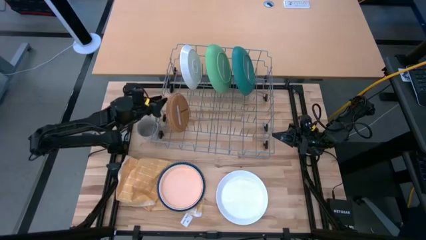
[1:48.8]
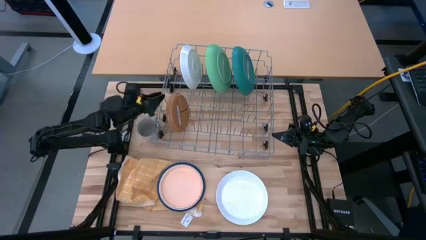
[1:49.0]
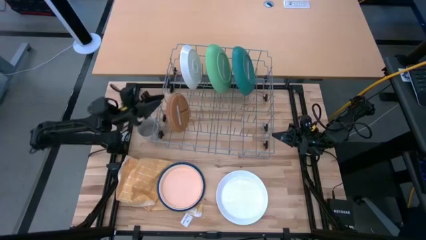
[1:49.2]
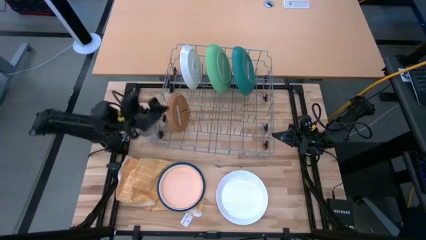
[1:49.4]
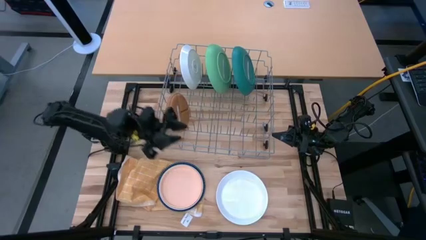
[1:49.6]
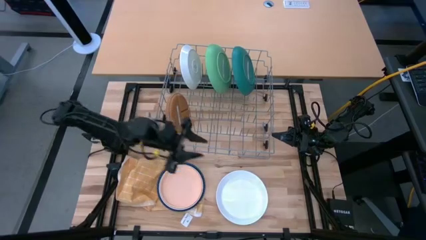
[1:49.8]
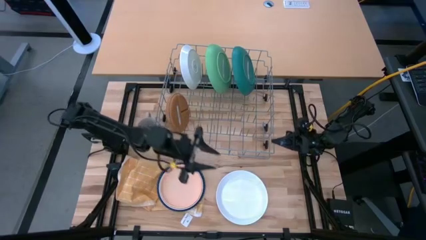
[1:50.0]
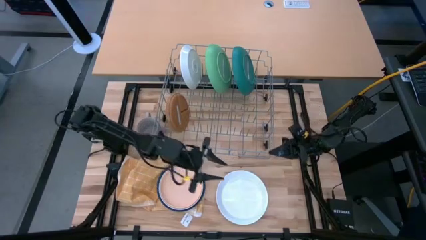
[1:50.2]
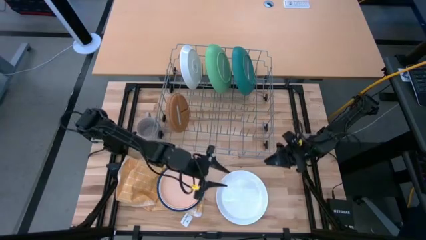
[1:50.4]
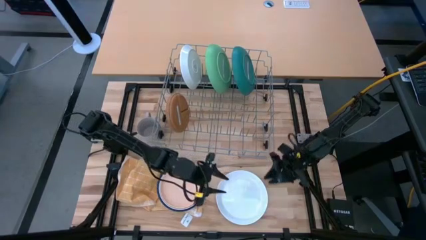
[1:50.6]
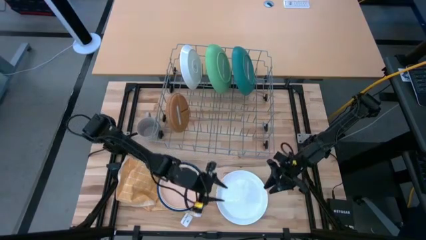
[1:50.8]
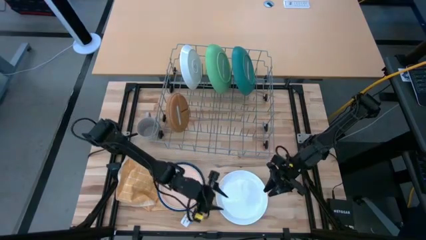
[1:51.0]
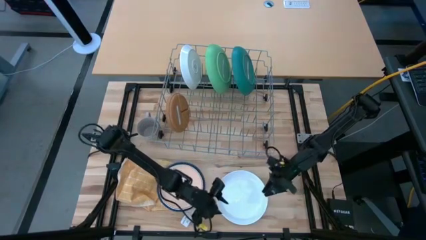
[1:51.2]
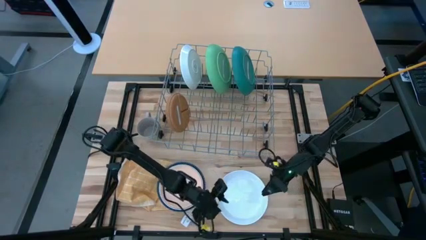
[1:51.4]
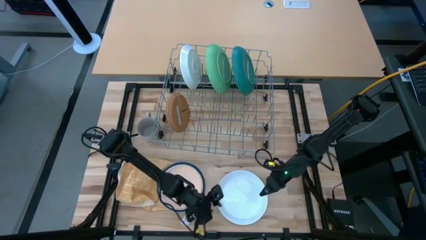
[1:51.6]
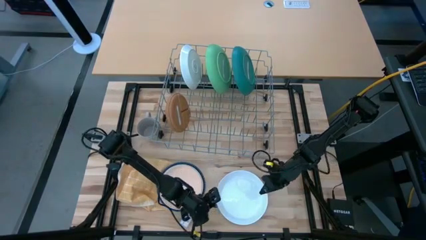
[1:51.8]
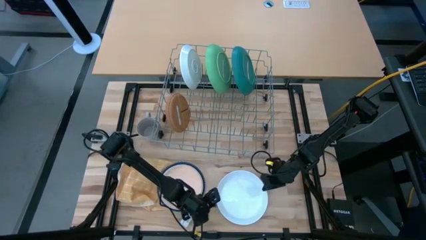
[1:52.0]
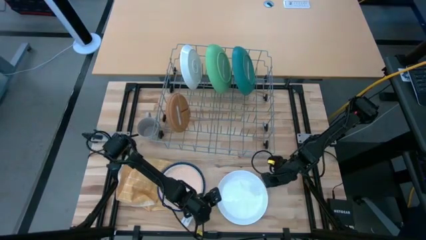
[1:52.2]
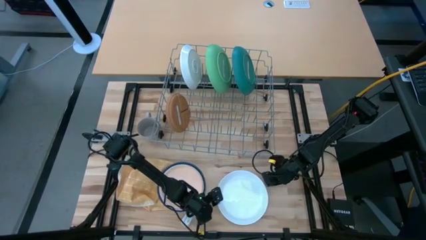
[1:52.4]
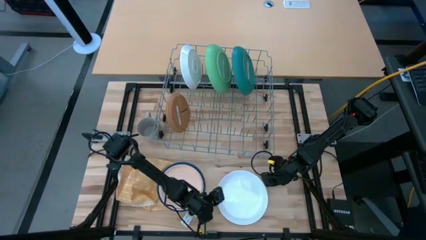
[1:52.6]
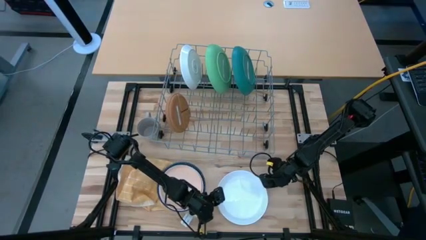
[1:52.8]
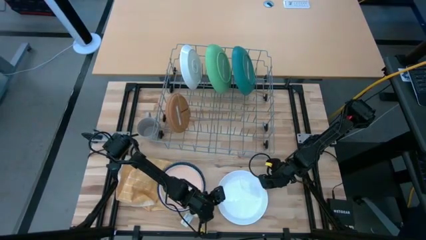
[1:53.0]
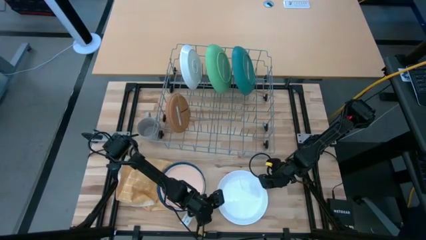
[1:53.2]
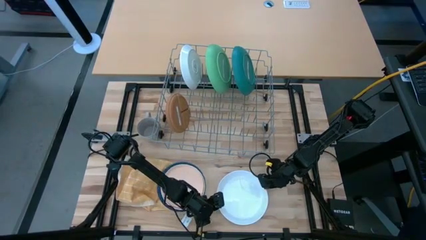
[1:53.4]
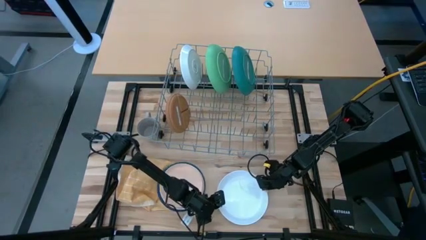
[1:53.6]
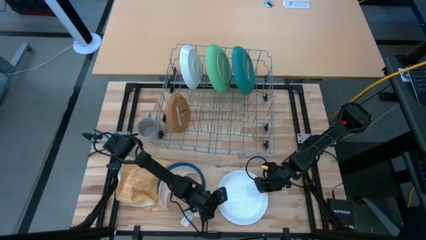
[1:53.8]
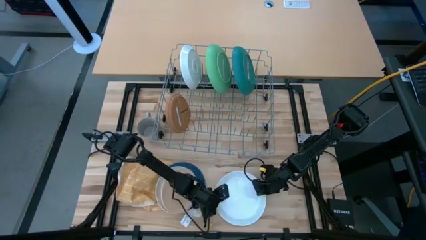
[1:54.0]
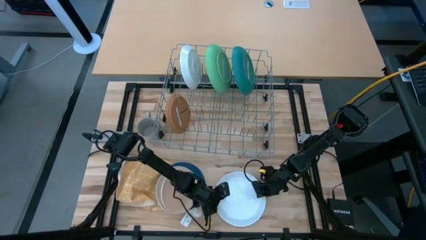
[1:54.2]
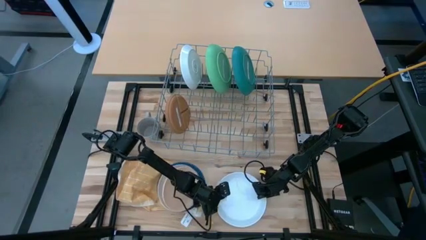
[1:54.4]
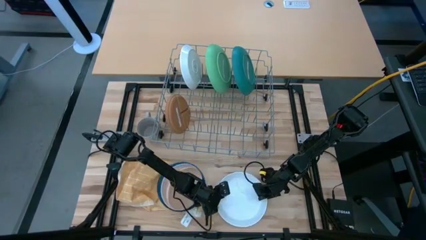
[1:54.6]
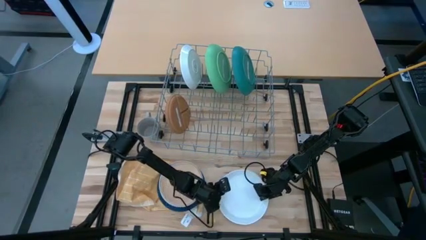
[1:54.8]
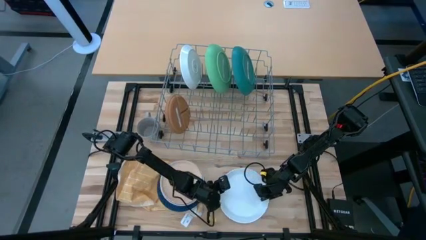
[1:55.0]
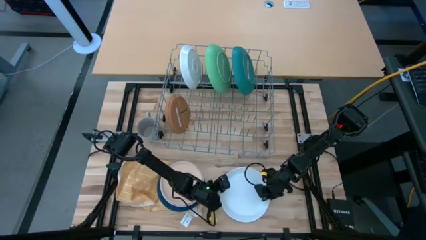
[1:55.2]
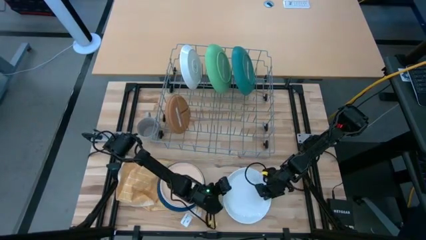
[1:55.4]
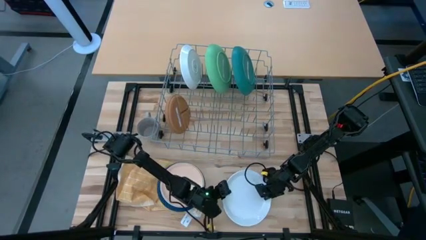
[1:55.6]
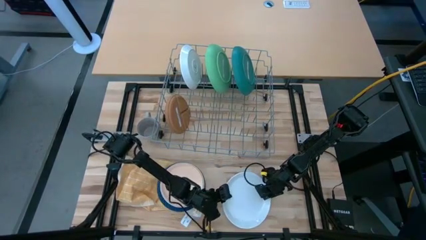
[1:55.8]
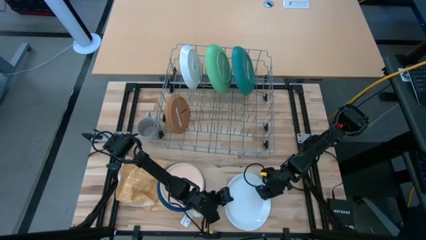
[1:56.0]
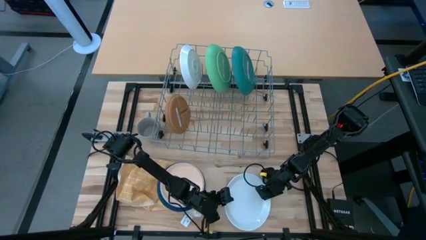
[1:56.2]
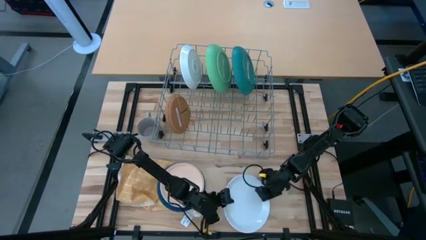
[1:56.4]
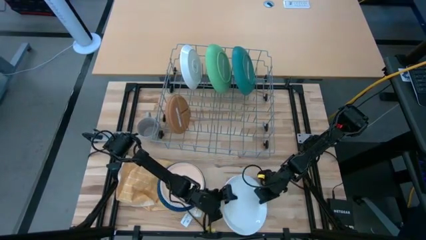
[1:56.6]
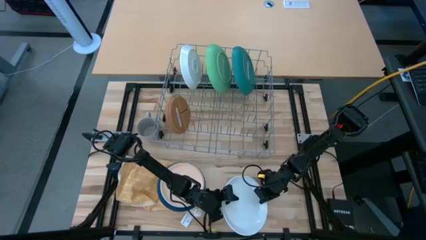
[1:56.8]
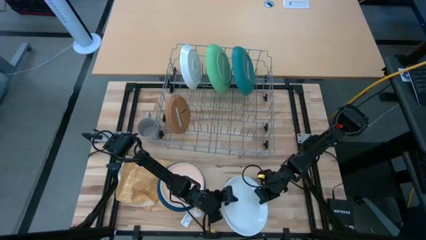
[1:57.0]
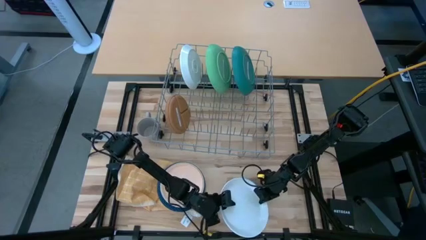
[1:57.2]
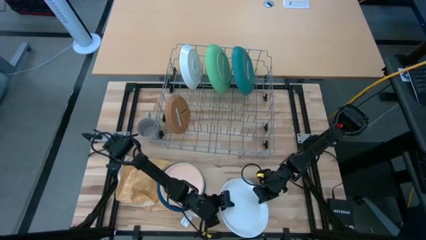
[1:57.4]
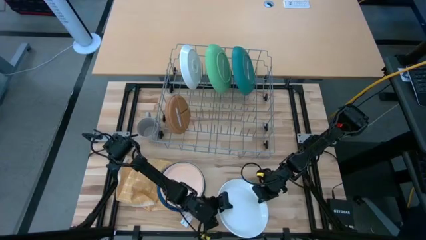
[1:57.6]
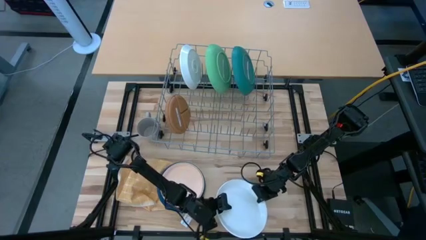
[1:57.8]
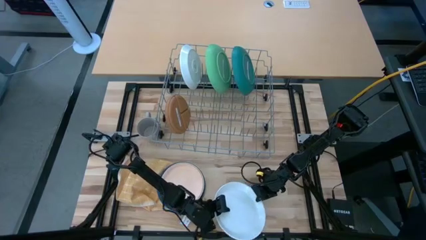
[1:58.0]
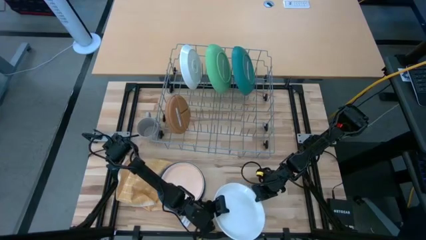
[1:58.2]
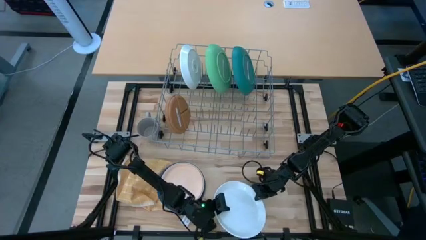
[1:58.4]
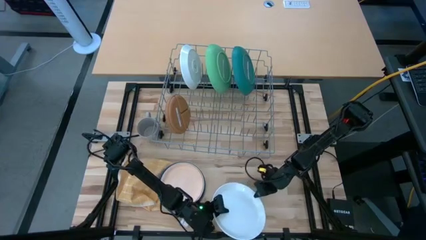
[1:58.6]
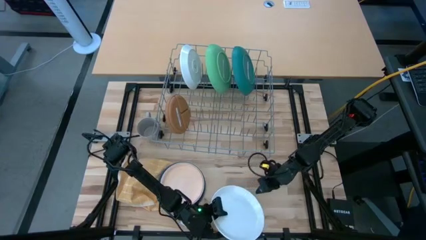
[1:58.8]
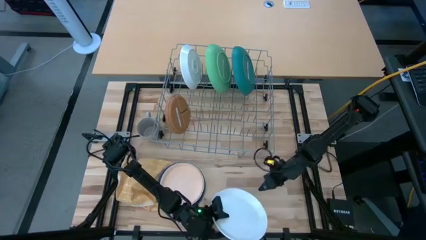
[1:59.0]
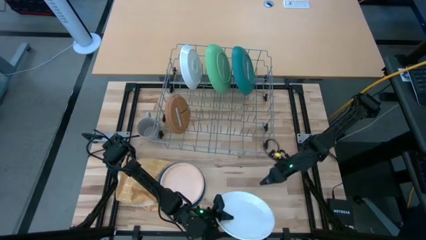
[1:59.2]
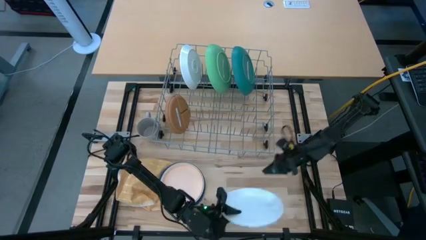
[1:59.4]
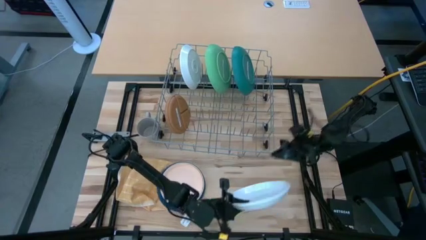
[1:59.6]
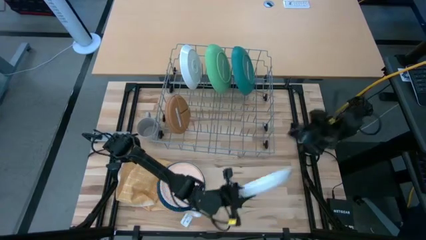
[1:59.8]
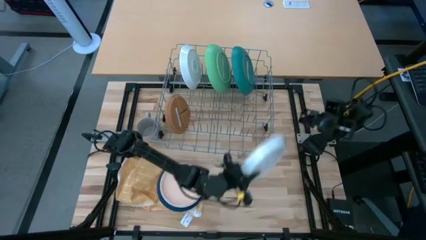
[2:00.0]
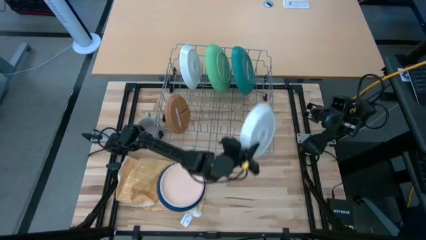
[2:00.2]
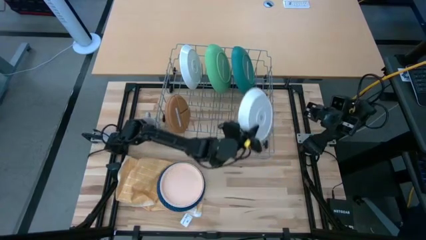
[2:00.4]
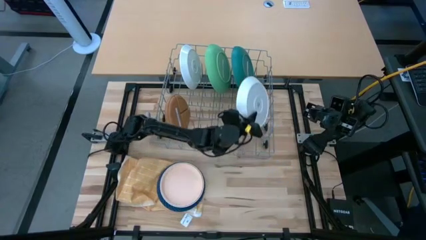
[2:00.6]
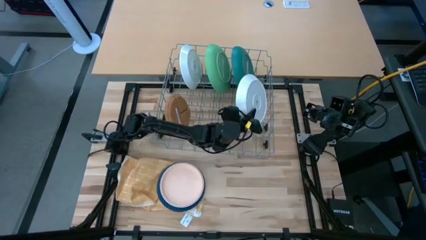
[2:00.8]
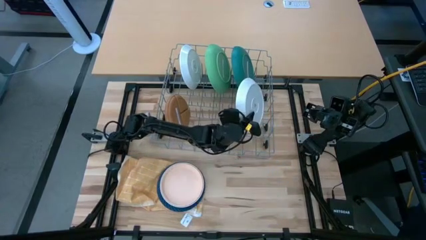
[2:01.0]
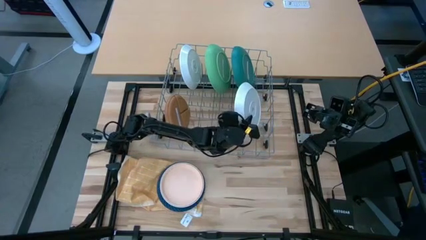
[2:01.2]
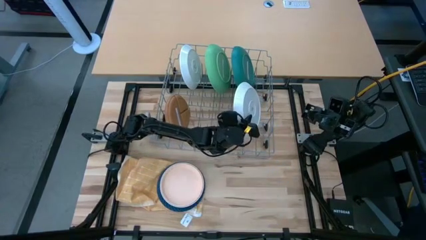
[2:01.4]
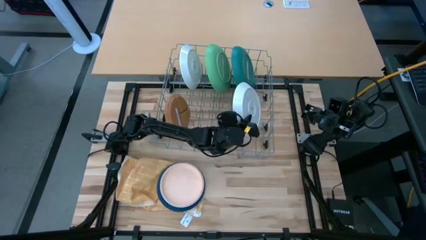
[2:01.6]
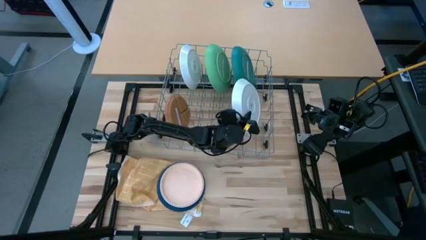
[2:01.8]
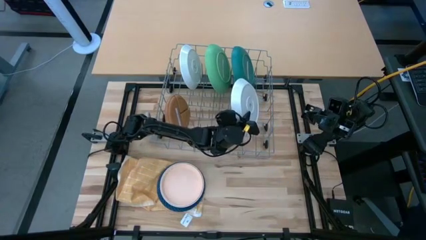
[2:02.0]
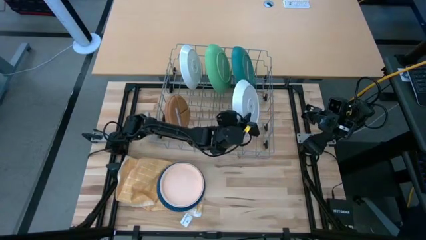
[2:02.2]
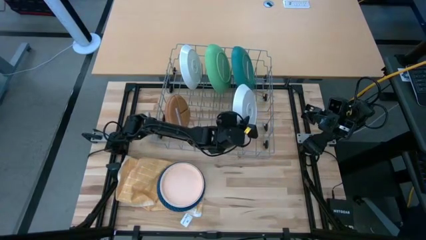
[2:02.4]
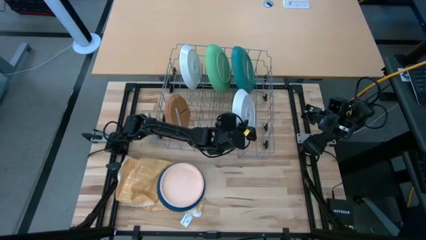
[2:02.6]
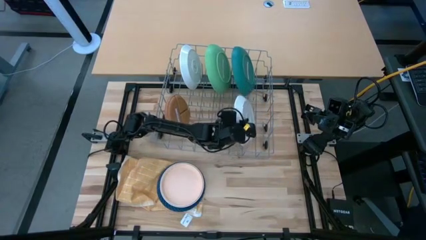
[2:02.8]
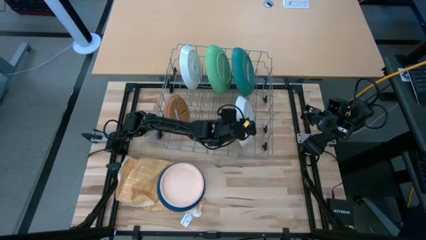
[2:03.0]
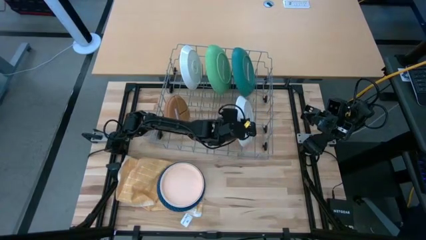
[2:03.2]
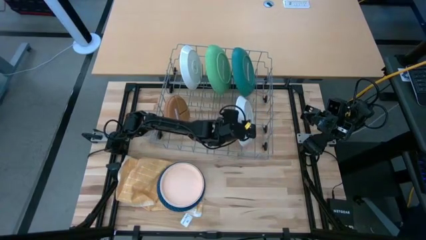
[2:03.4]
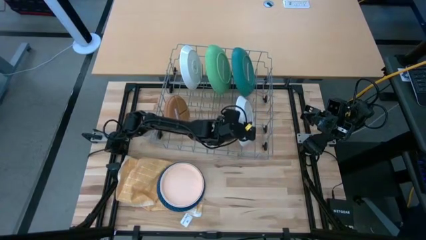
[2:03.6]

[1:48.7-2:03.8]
Task: Sort dishes
Put the white plate in the dish rack
